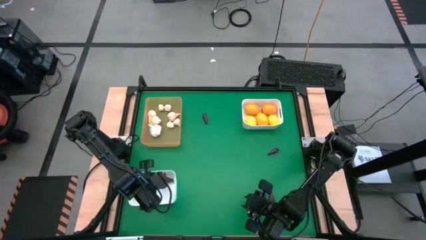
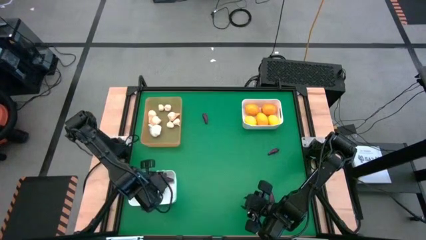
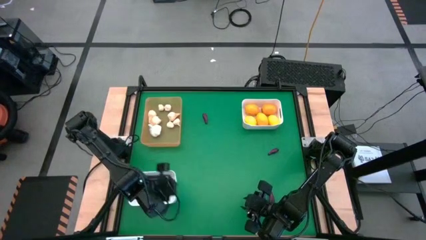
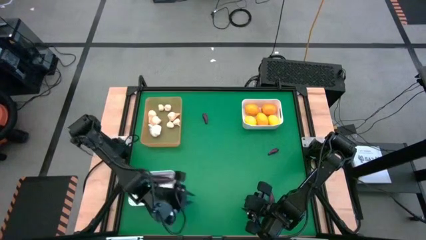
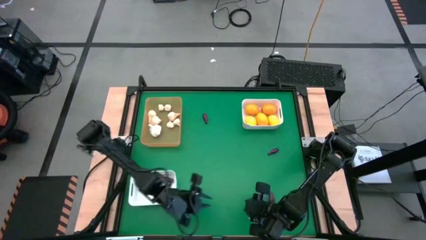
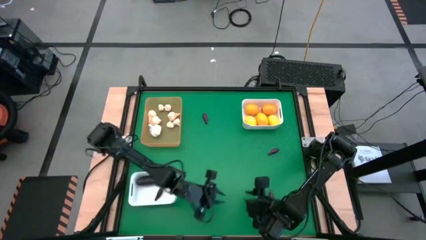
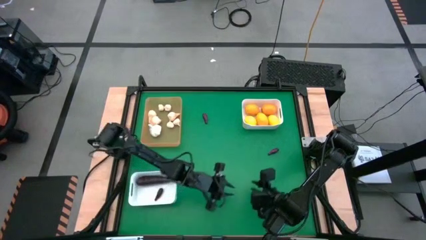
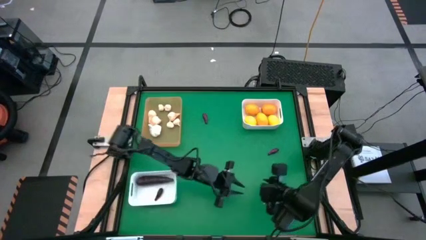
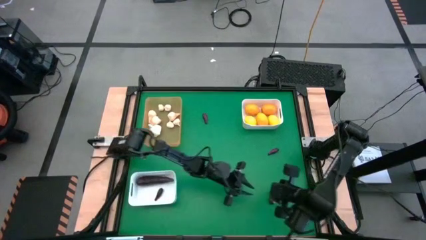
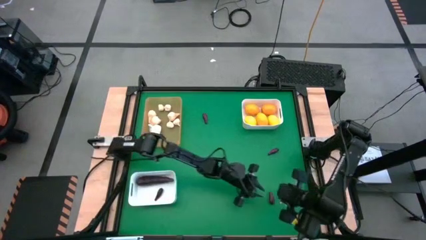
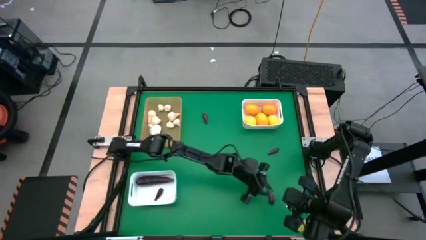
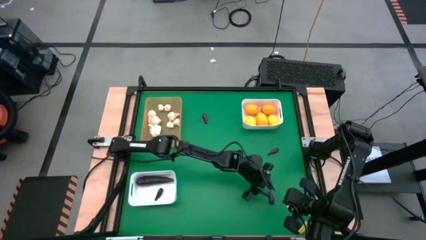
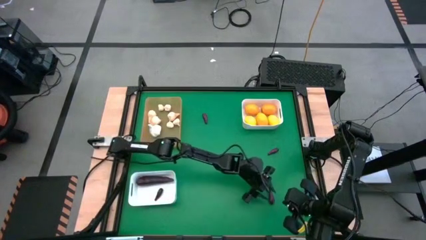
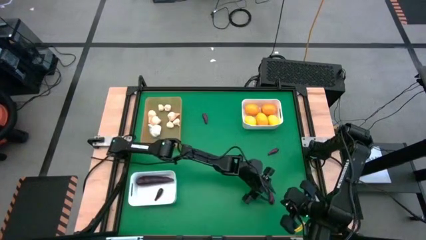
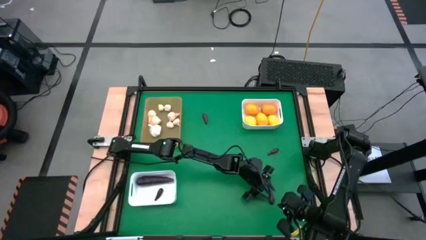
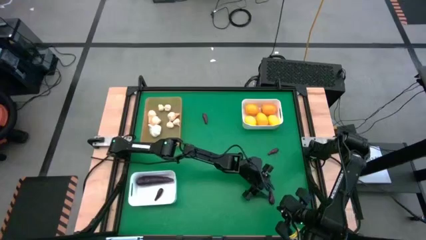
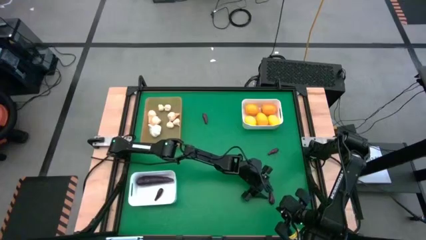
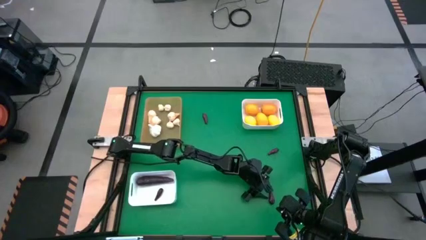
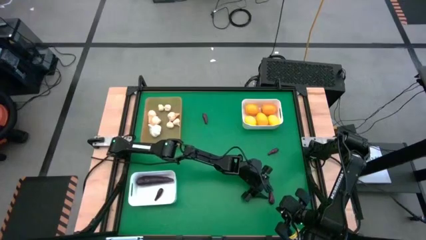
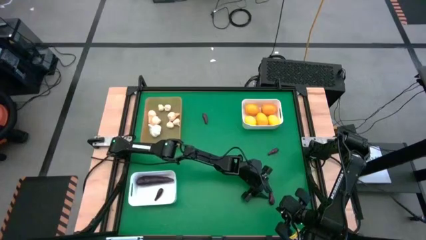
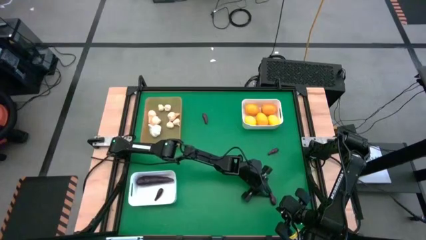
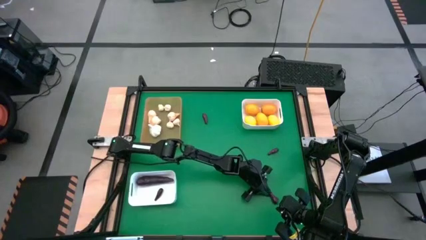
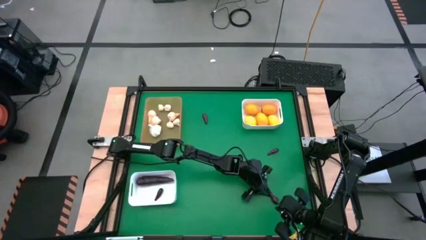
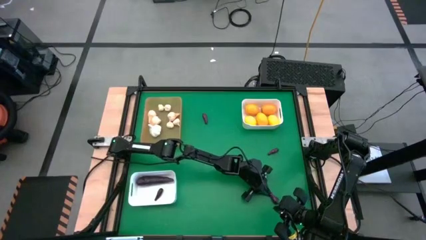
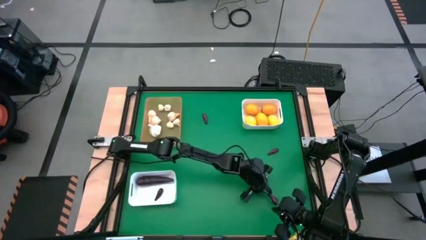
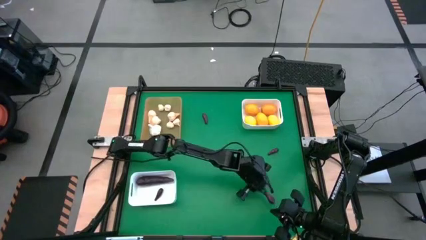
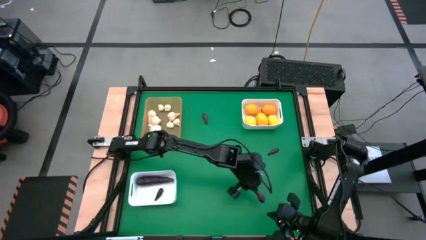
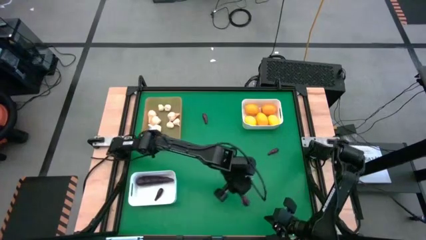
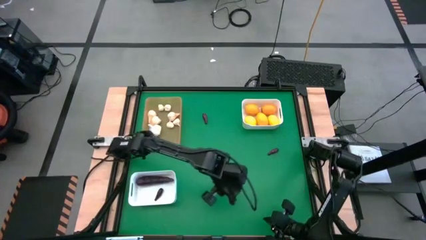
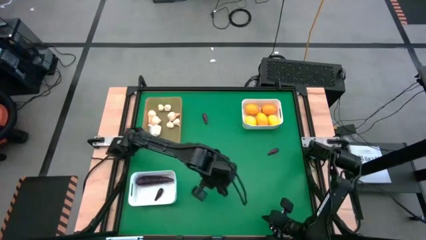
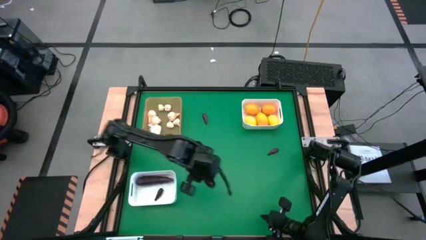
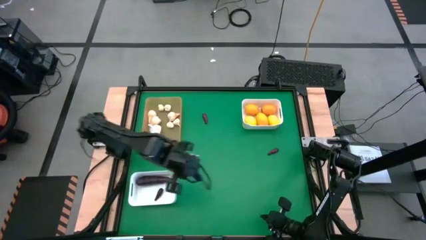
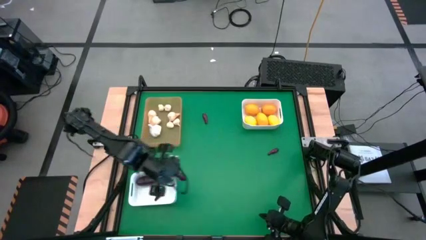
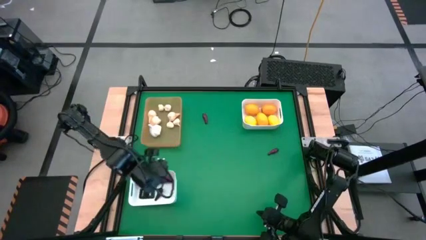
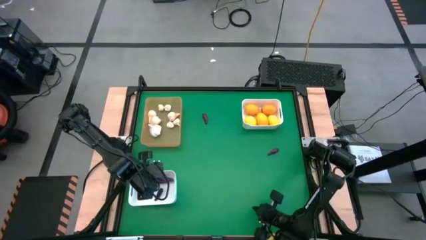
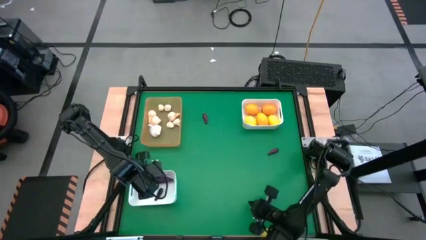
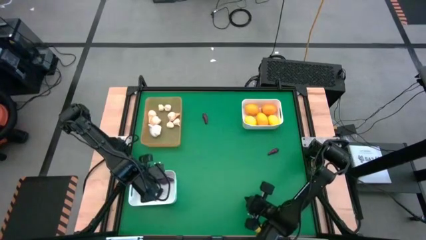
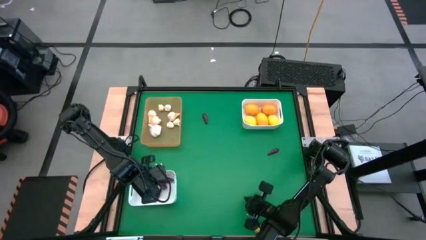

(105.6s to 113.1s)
Task: Sort produce into baskets
Put the eggplant into the bottom white bin

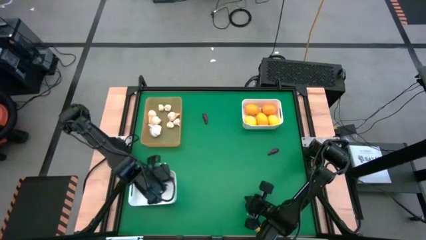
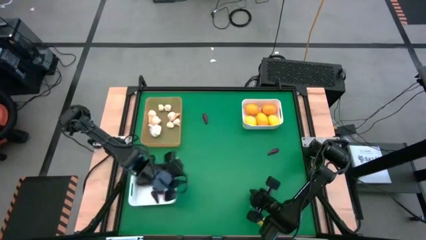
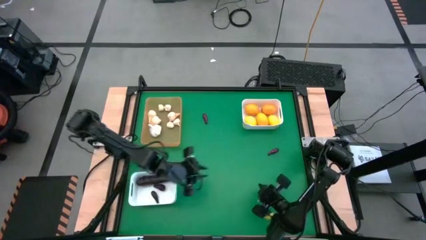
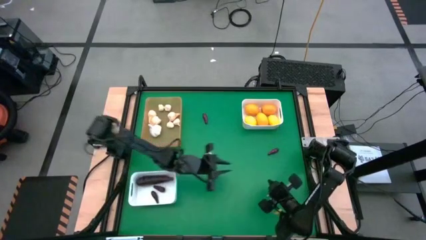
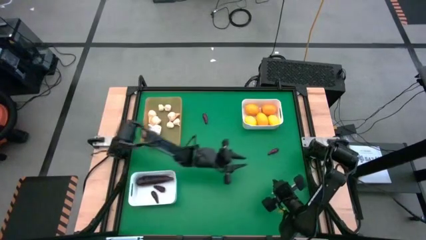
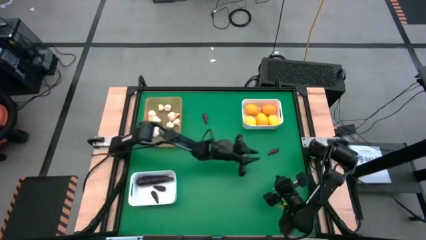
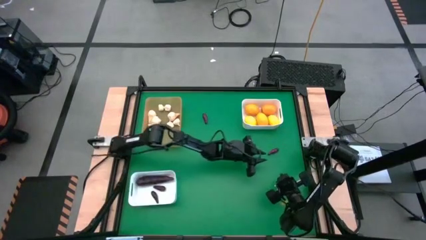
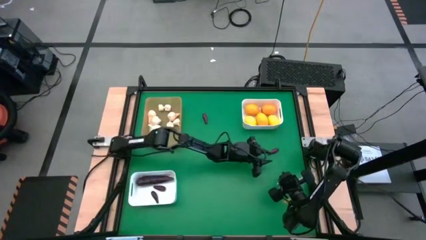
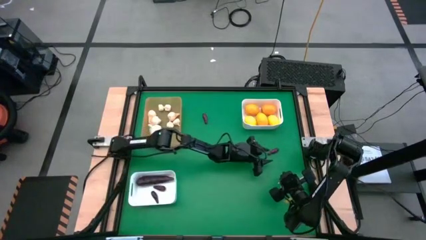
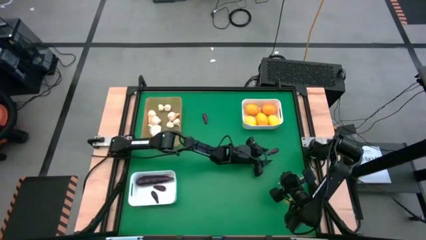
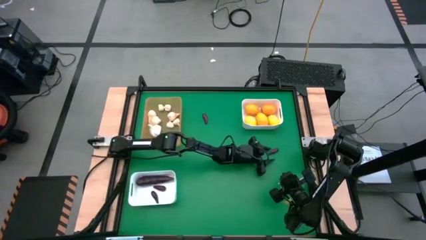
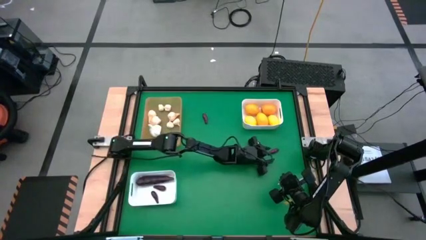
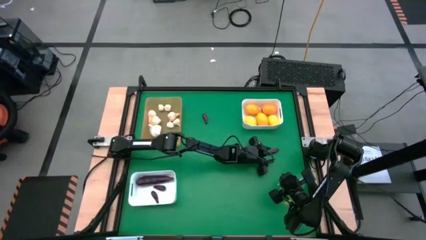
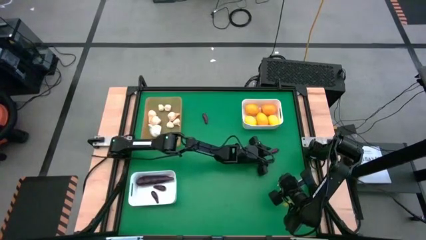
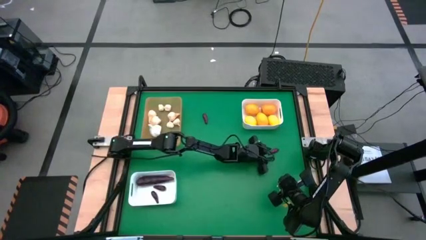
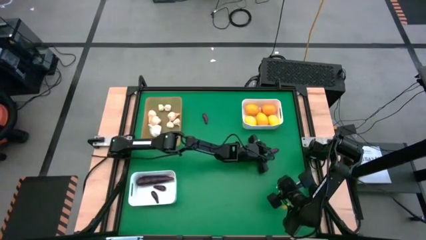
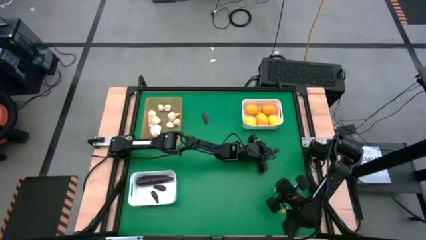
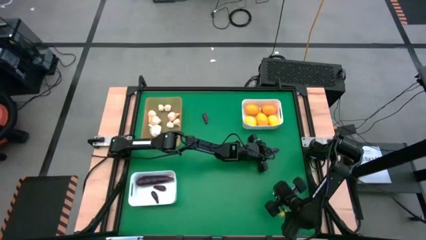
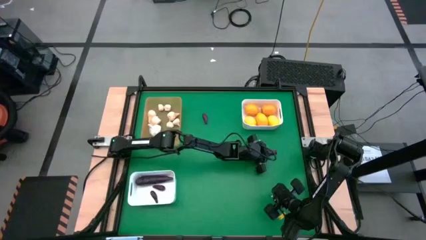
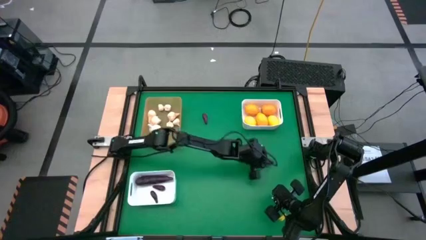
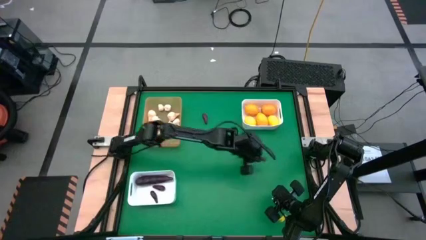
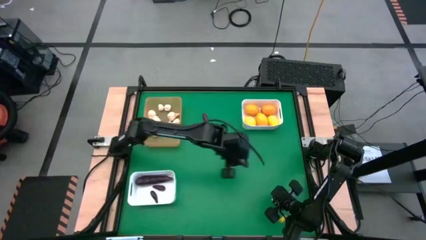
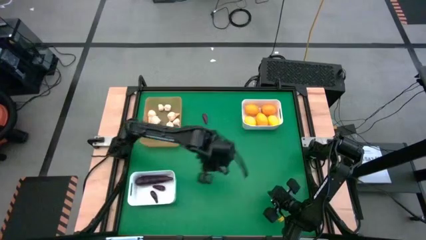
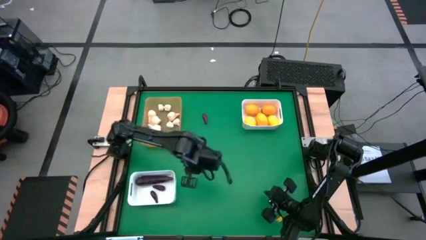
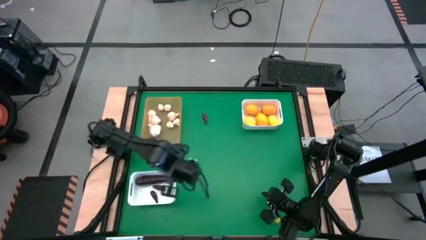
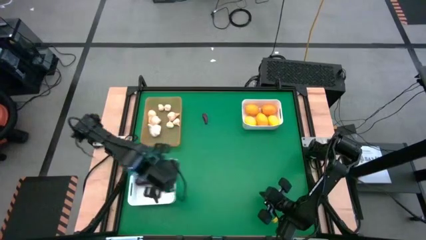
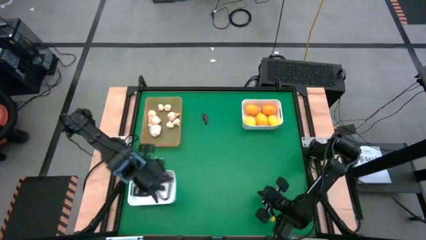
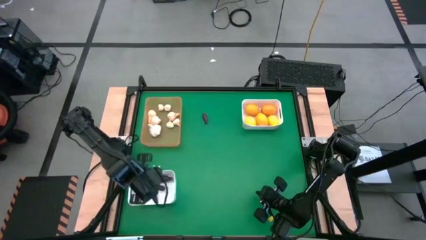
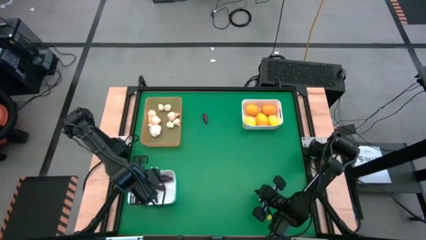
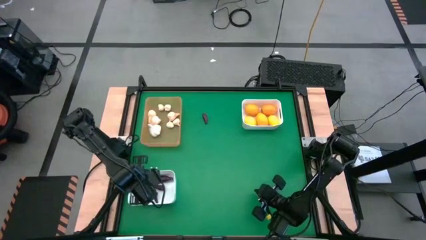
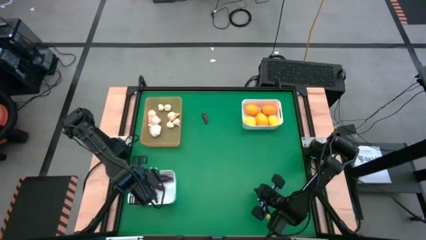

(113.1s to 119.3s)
Put the eggplant into the bottom white bin

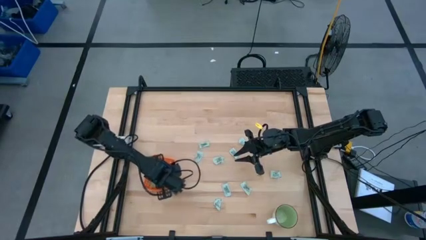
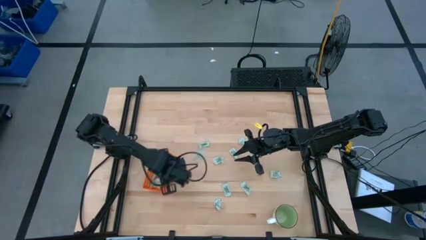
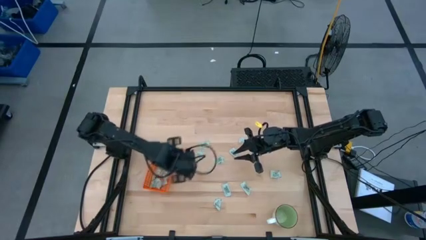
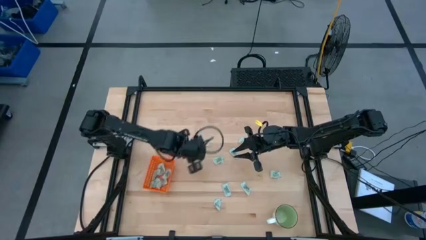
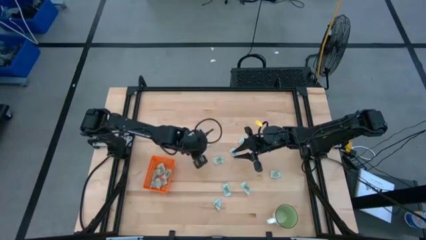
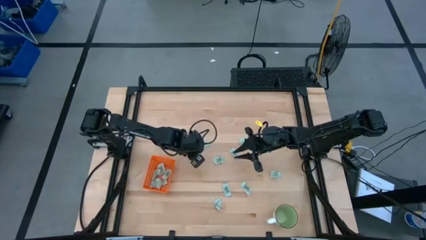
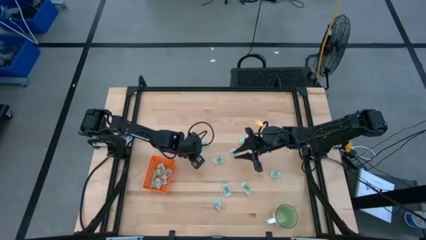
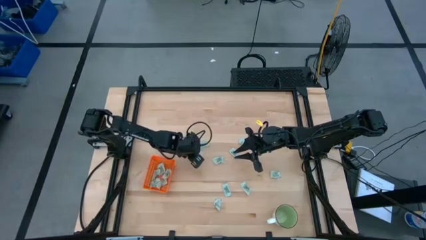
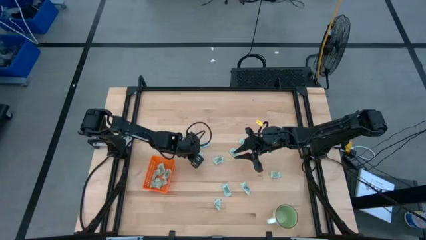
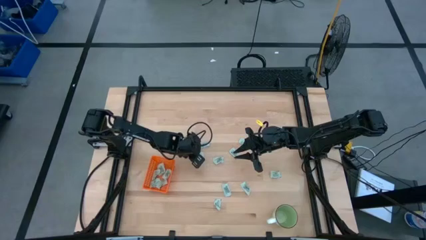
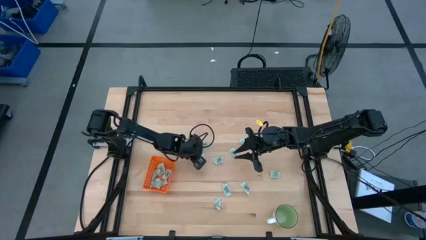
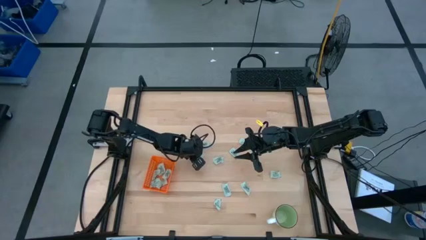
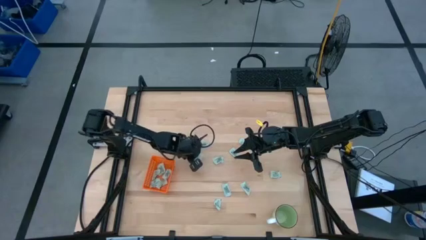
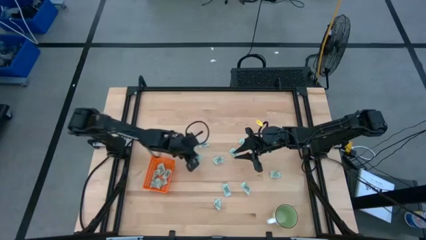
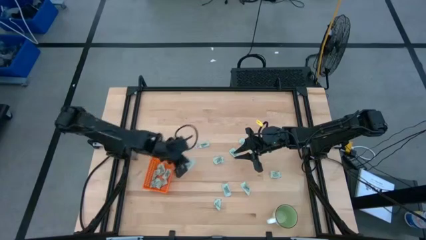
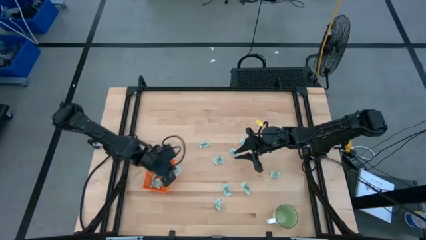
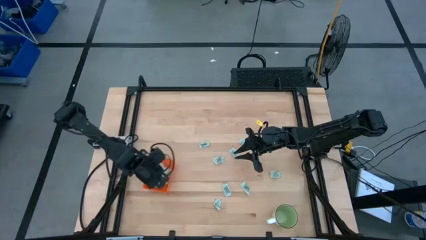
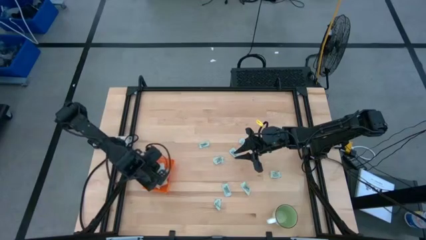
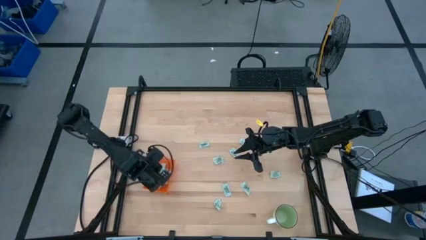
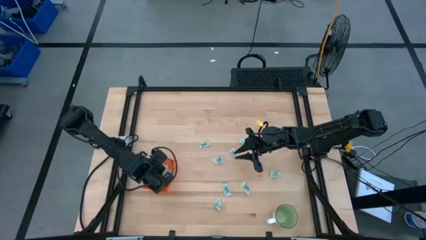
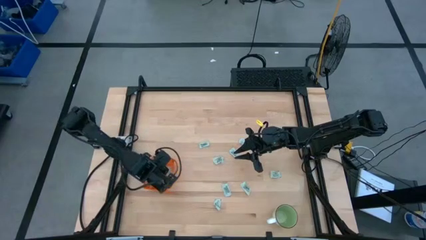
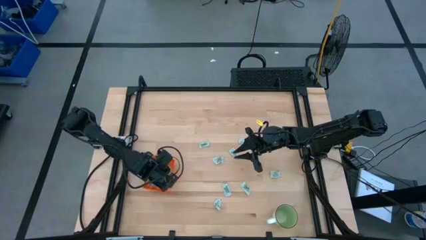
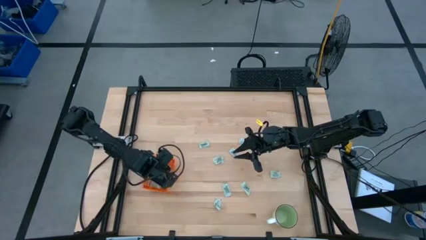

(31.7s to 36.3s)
Task: Pick and place Stevia / Truvia into bins
Put the white stevia packet into the orange bin
